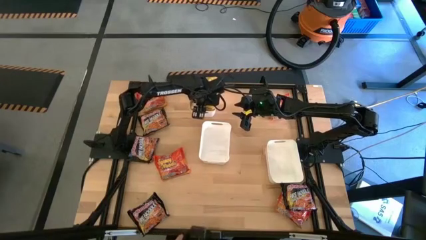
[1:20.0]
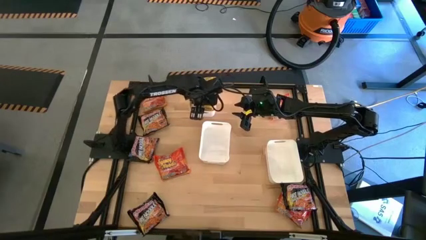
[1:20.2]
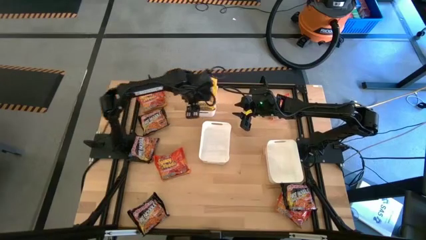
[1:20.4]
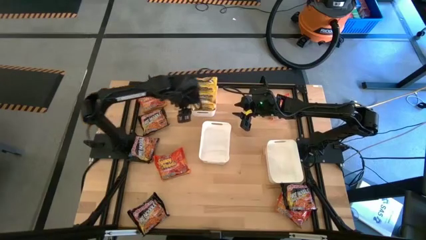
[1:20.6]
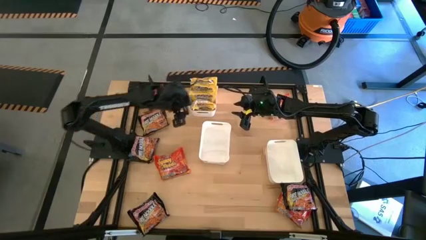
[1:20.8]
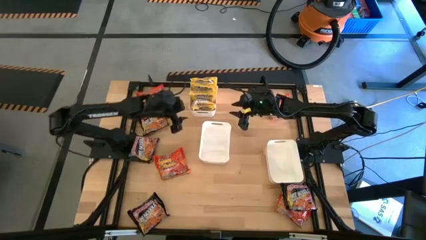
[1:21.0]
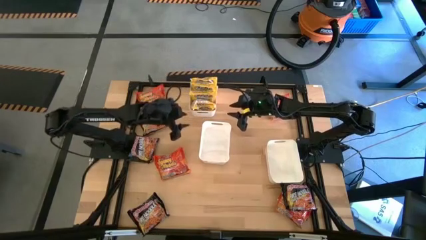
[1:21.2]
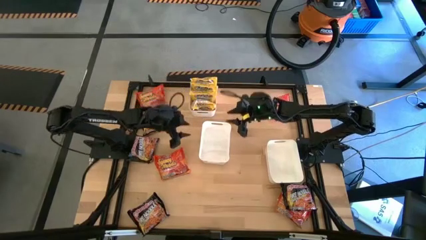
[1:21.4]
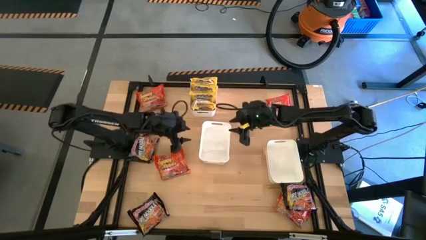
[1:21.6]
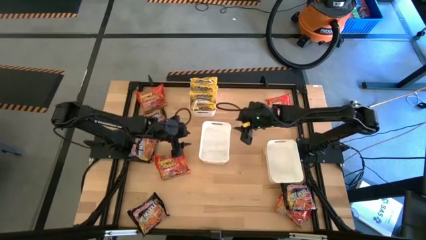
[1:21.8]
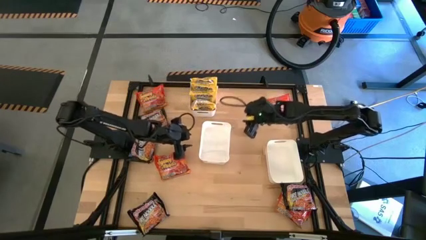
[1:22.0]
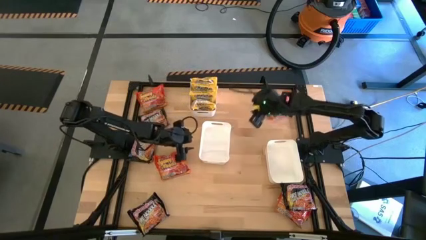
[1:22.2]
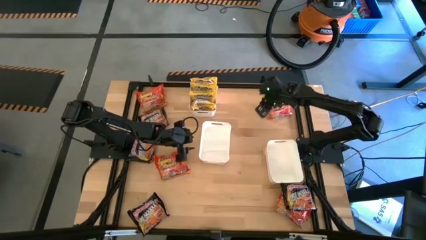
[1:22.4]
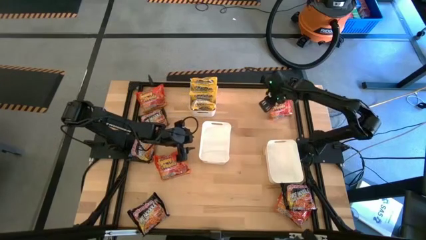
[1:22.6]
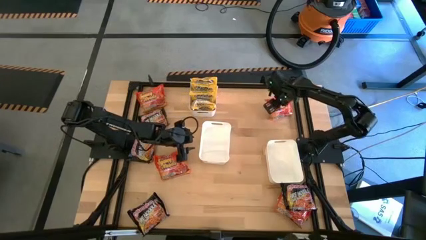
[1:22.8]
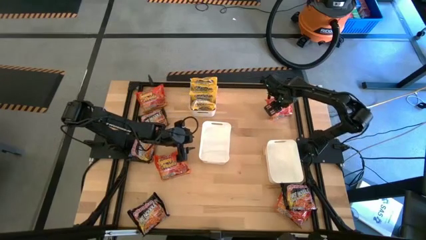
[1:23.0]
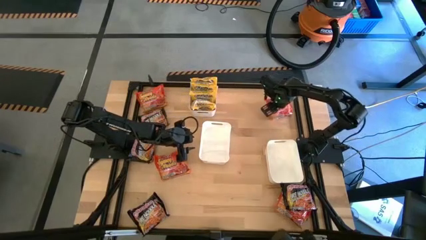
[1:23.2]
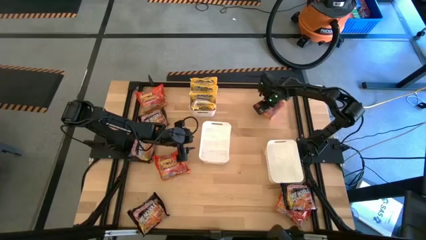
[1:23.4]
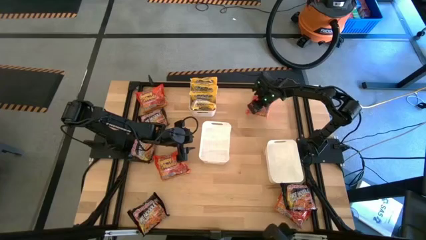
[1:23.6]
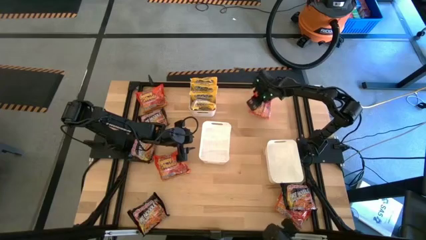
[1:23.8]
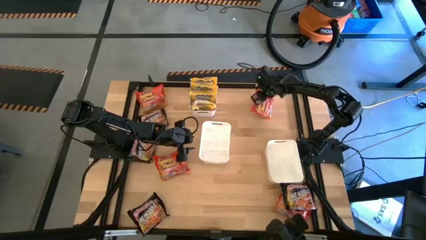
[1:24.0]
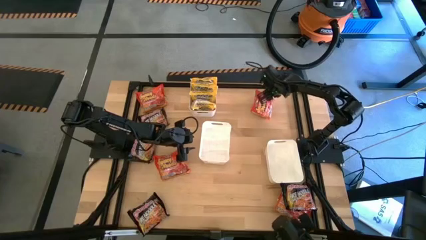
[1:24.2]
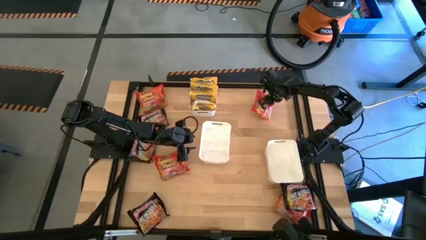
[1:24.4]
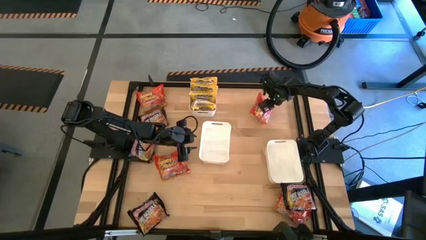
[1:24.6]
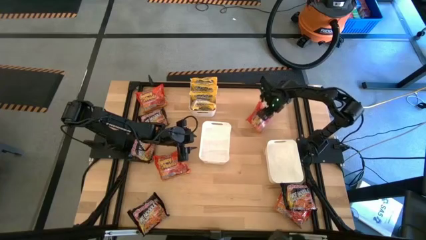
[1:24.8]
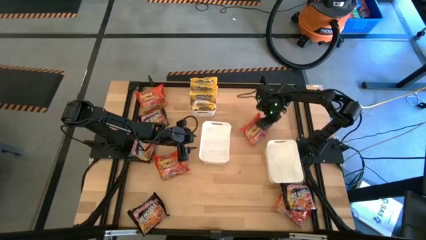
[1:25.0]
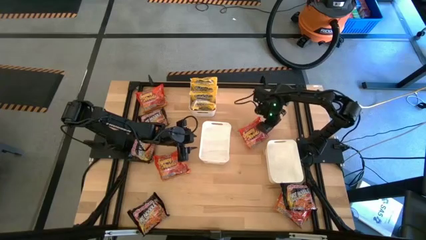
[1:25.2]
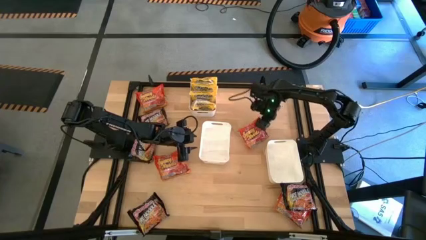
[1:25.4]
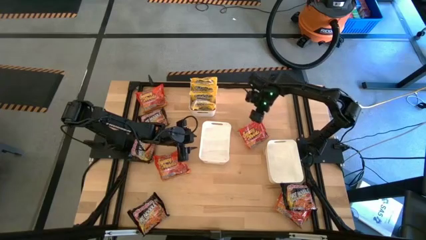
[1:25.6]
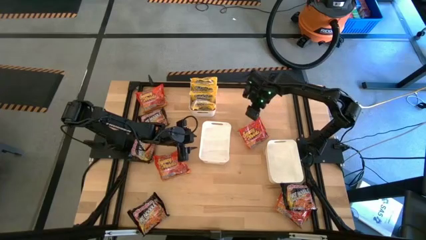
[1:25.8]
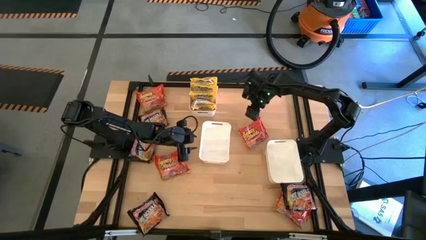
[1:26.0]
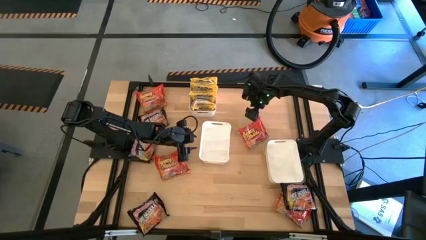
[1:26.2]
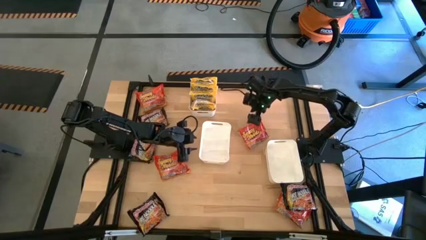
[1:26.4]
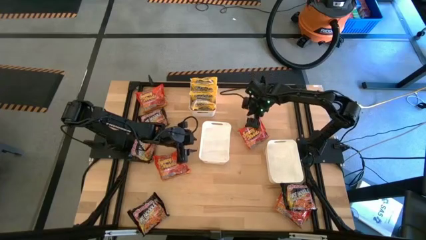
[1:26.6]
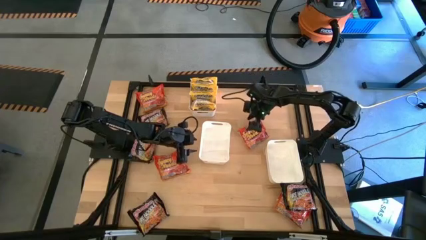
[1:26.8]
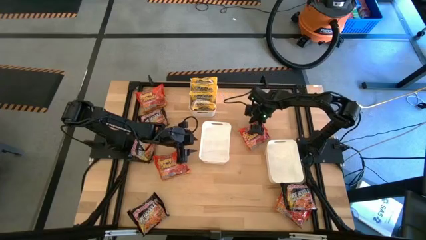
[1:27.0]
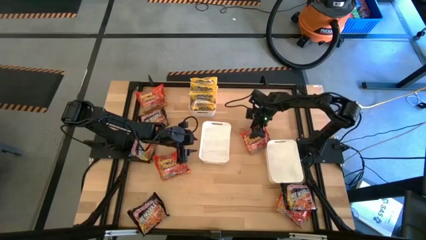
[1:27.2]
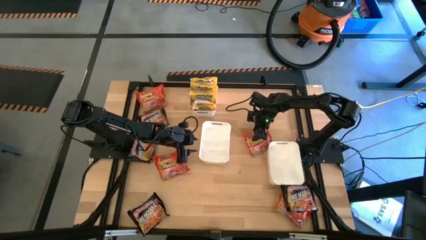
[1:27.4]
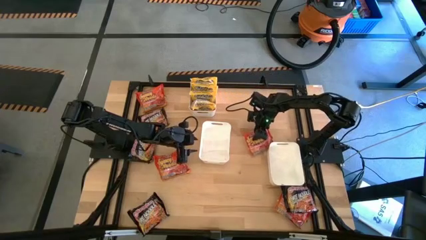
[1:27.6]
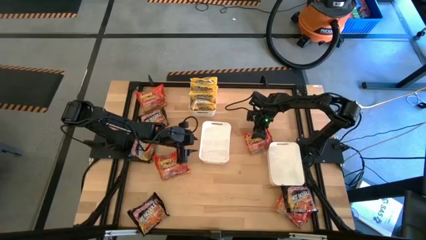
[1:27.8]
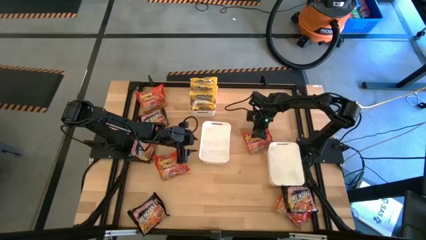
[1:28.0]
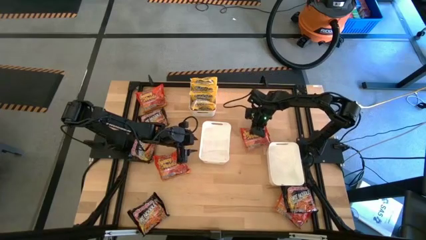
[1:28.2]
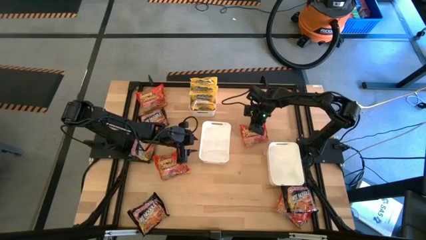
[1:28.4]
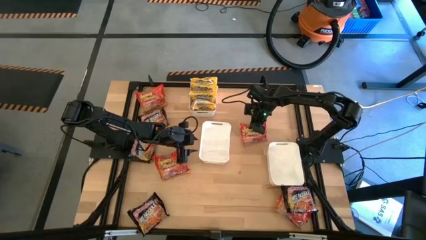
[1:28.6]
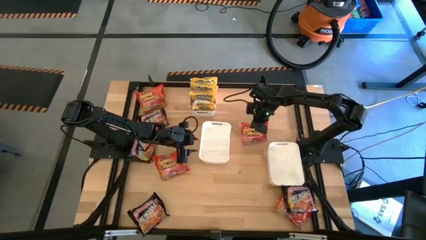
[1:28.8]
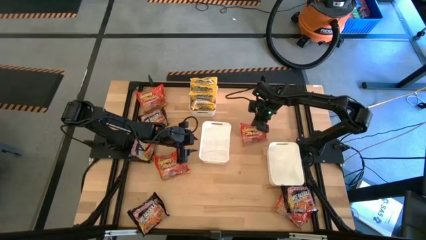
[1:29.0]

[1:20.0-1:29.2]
Task: Sort Maruchan noodles
Put the orange noodle pack into the bottom right white bin

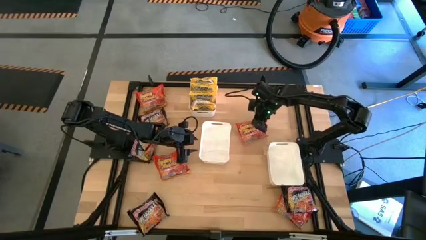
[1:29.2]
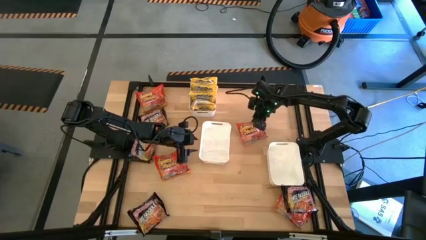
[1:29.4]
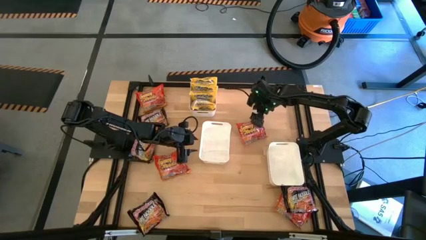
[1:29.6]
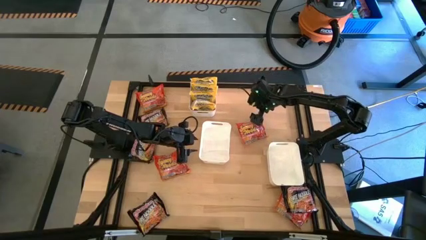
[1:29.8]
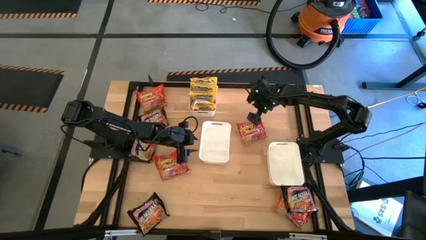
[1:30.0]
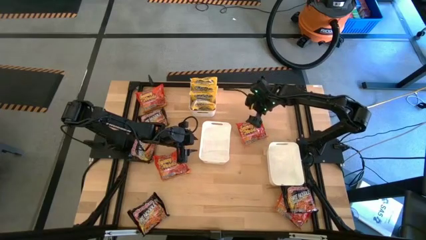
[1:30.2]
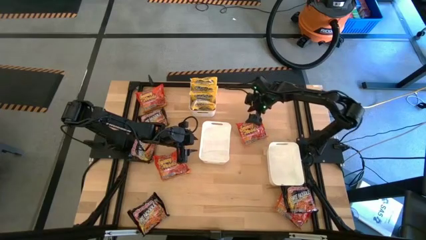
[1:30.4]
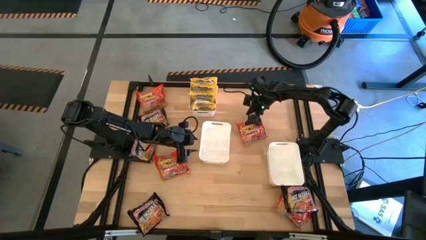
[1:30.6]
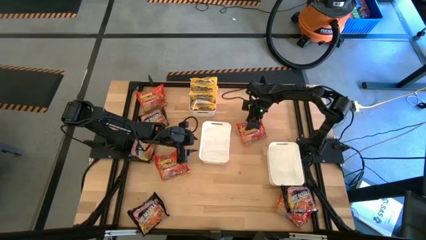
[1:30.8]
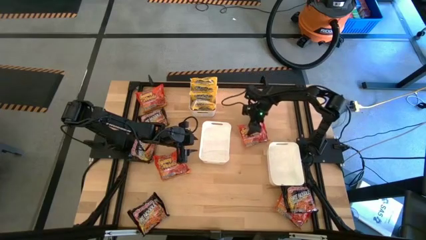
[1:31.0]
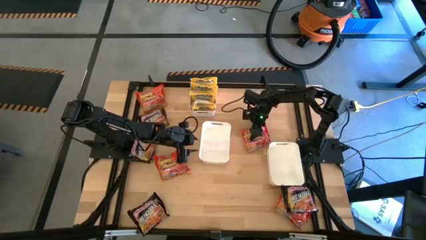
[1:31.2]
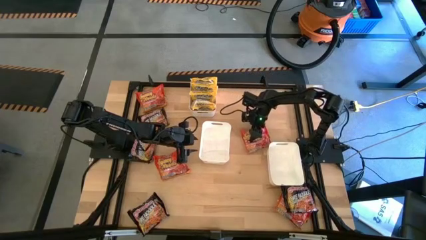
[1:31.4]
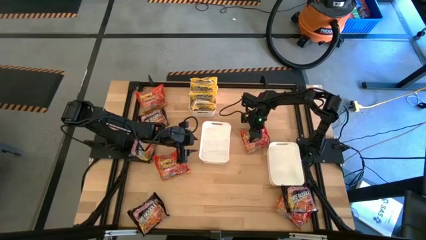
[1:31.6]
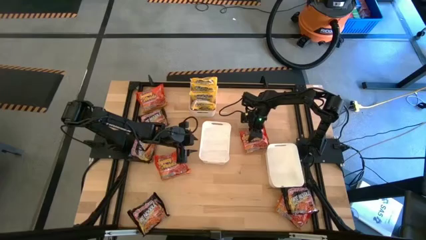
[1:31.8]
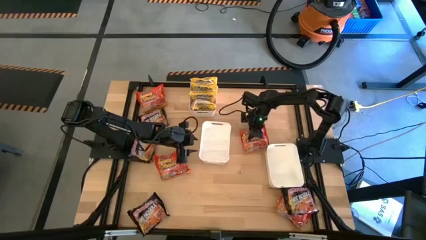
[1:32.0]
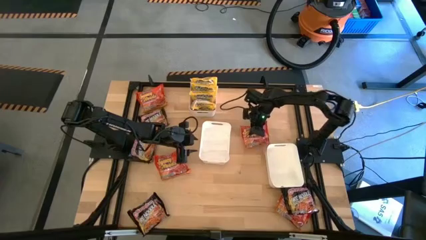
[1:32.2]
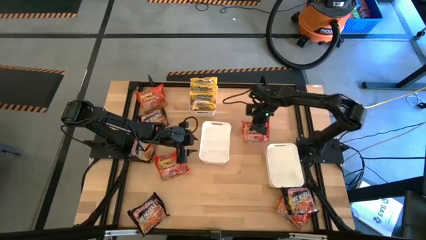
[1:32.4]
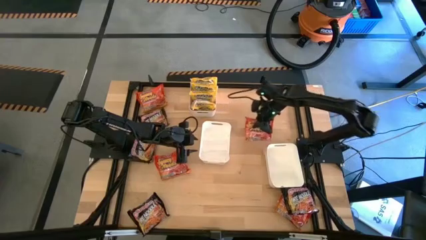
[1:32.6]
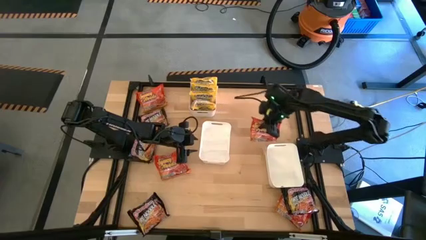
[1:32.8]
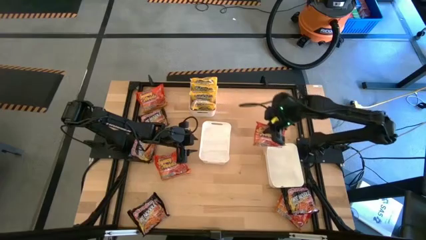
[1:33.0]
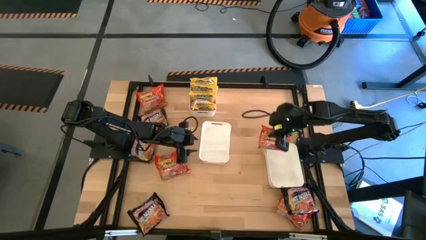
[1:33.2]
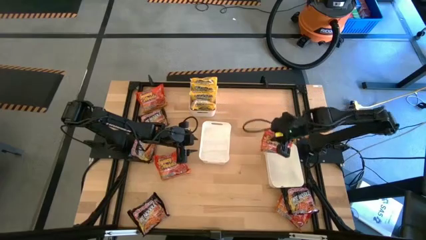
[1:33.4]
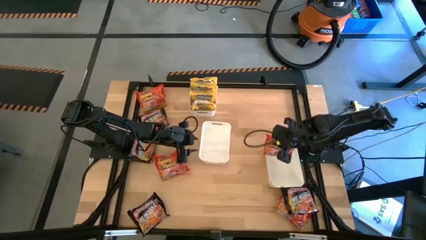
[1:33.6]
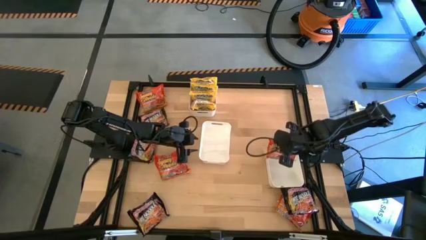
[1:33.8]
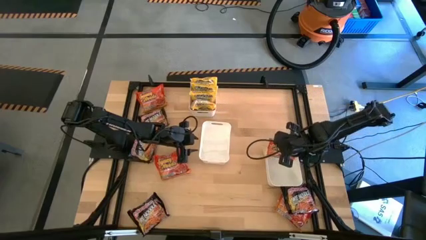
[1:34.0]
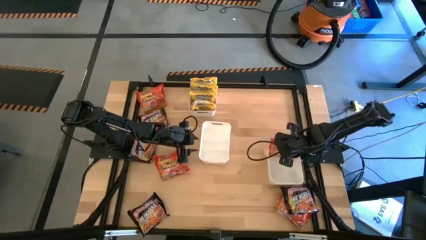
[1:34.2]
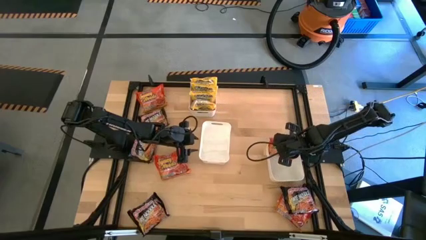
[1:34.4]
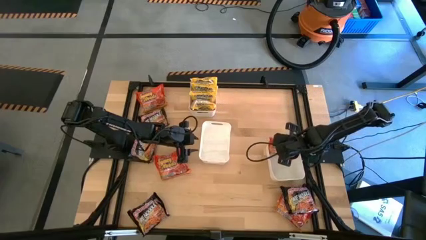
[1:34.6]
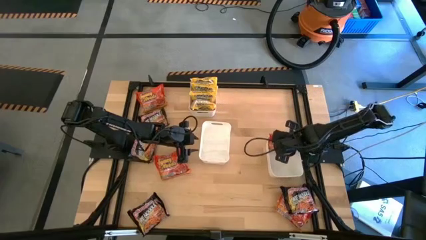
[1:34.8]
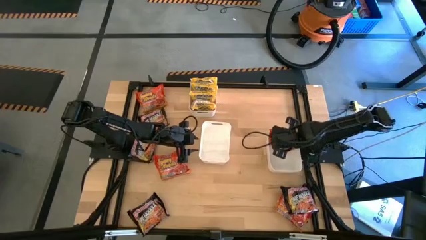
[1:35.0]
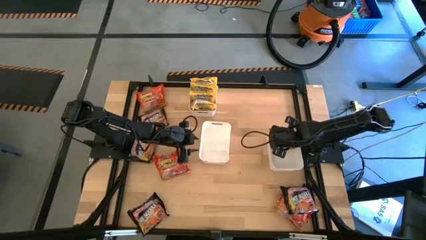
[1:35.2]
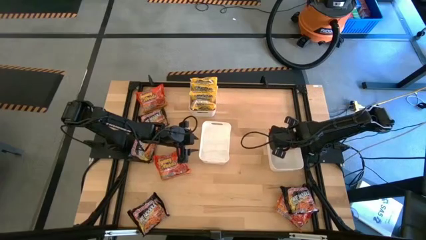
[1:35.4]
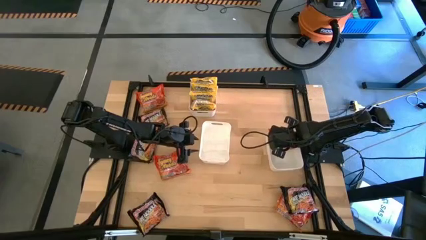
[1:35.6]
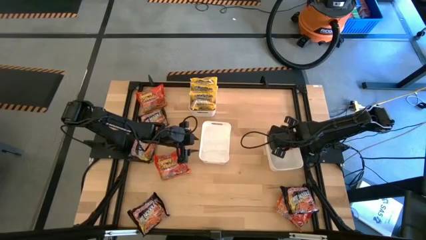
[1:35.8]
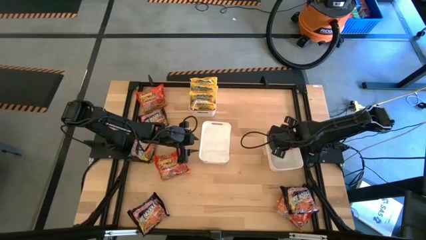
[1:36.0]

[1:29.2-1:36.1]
Put the orange noodle pack into the bottom right white bin
